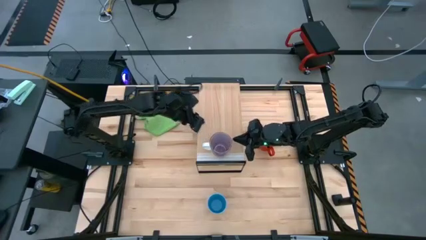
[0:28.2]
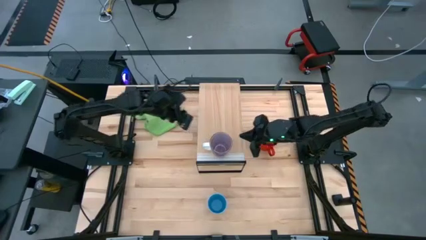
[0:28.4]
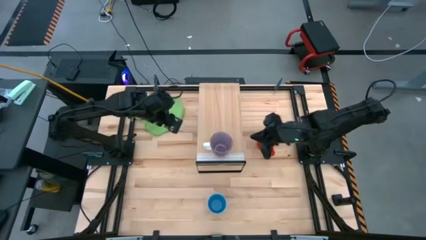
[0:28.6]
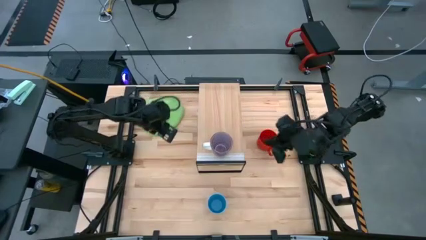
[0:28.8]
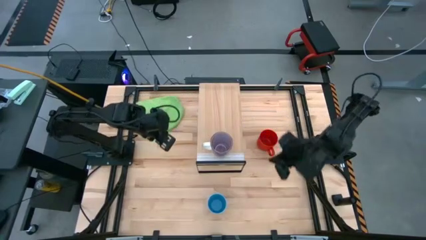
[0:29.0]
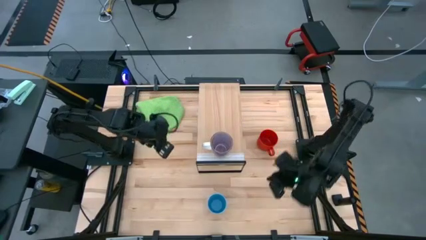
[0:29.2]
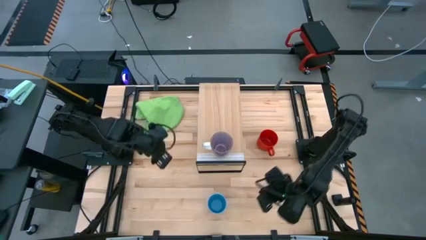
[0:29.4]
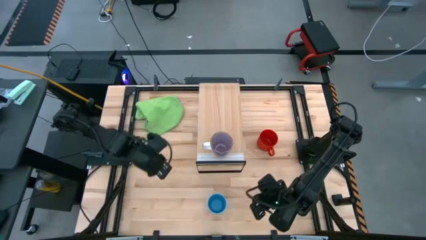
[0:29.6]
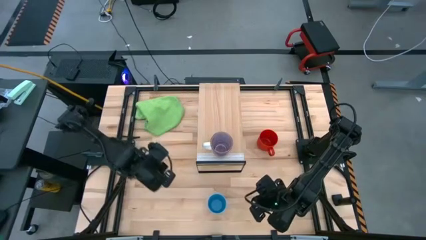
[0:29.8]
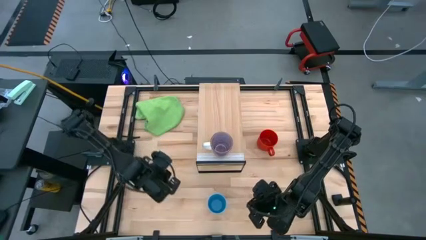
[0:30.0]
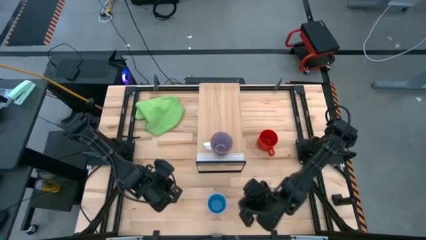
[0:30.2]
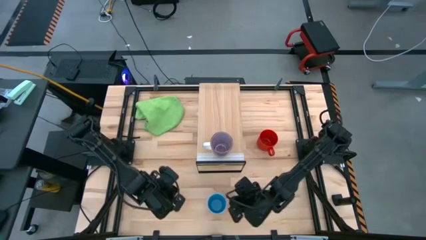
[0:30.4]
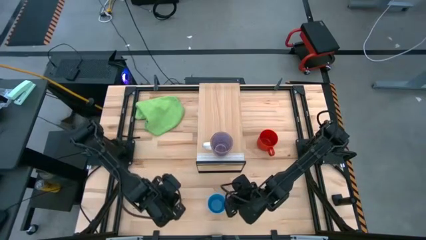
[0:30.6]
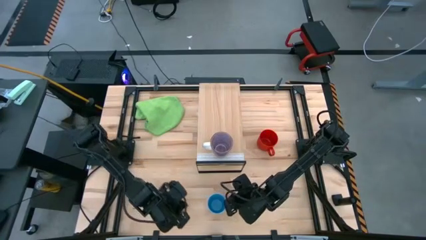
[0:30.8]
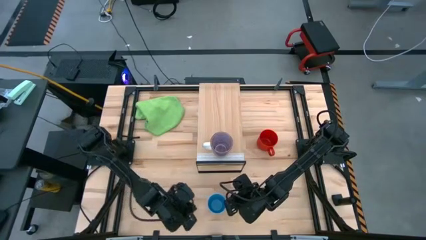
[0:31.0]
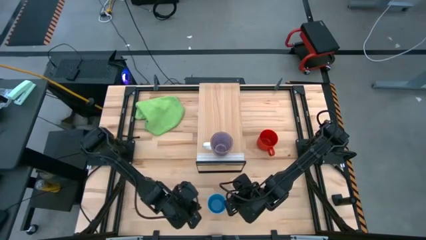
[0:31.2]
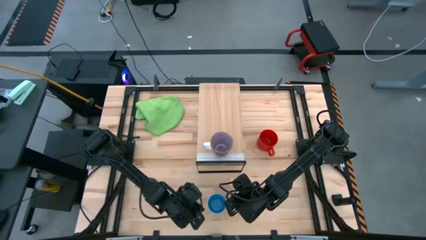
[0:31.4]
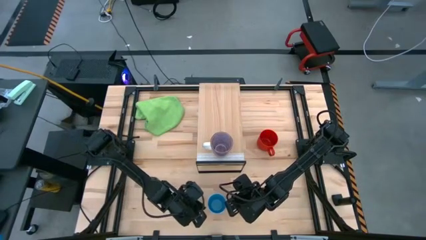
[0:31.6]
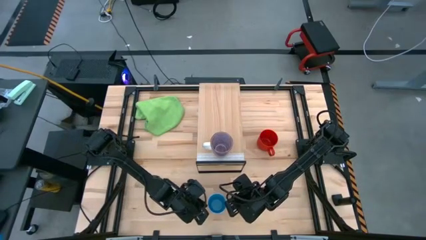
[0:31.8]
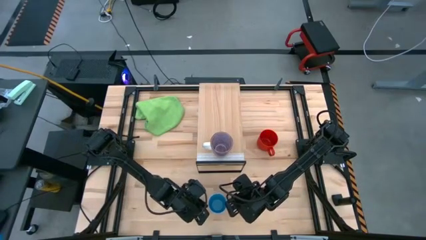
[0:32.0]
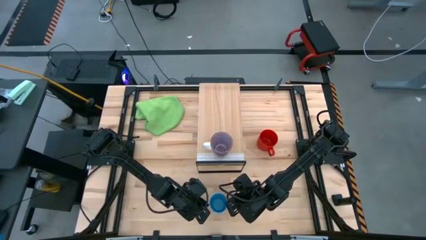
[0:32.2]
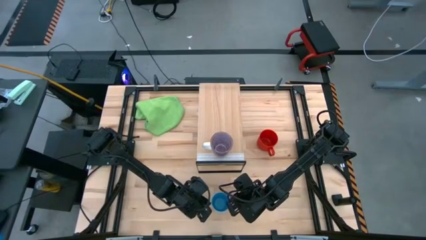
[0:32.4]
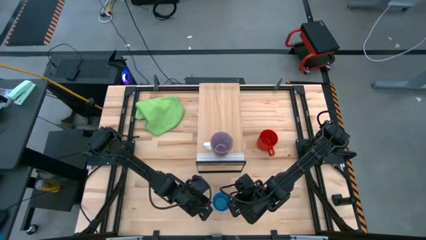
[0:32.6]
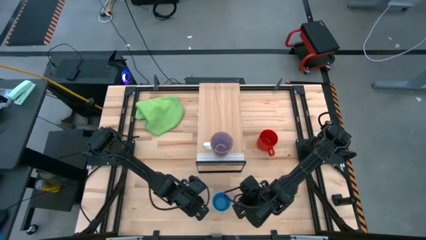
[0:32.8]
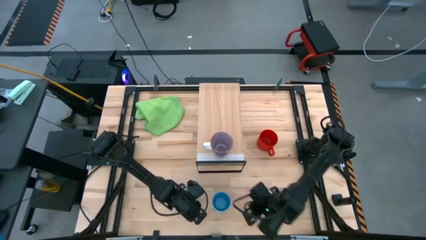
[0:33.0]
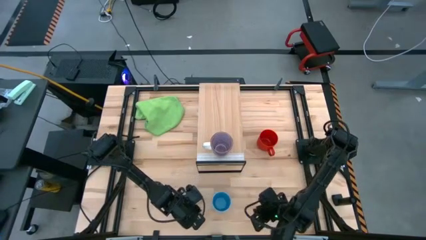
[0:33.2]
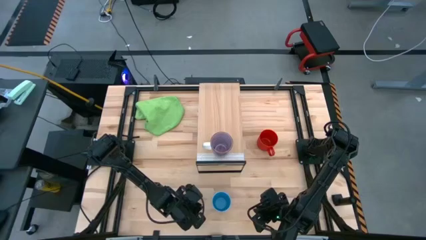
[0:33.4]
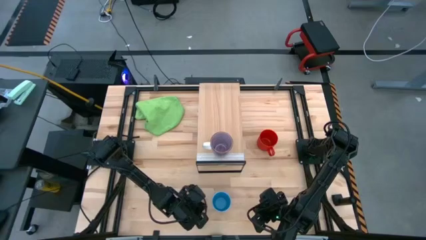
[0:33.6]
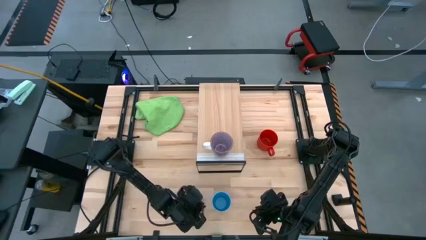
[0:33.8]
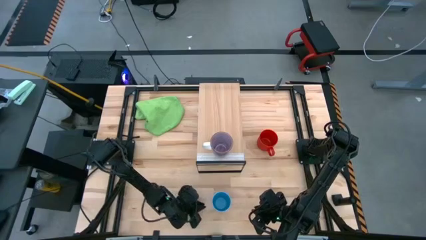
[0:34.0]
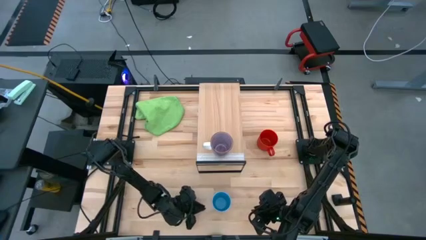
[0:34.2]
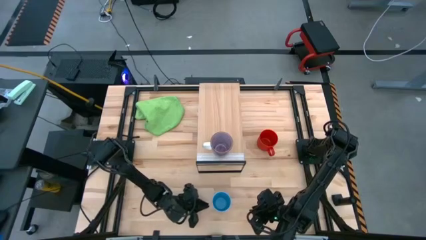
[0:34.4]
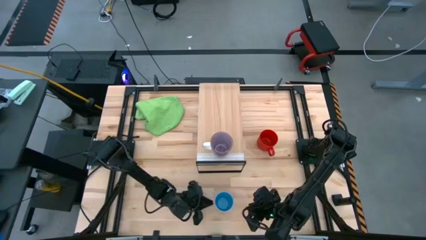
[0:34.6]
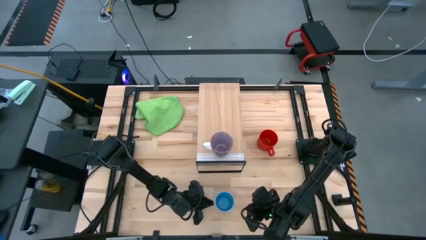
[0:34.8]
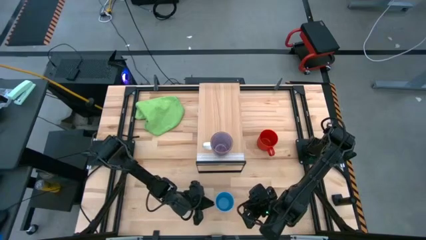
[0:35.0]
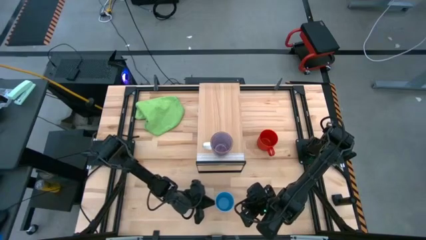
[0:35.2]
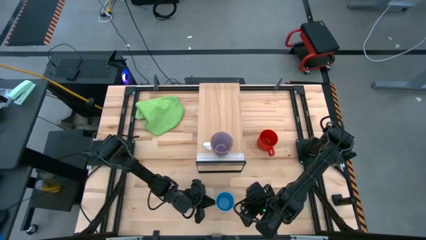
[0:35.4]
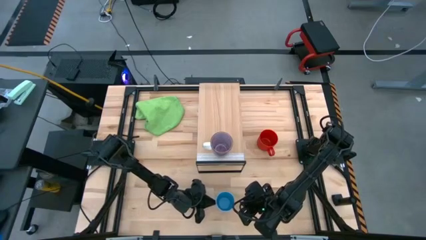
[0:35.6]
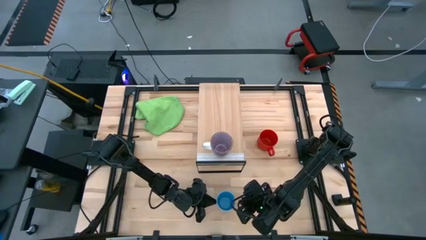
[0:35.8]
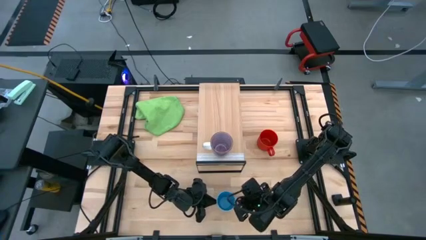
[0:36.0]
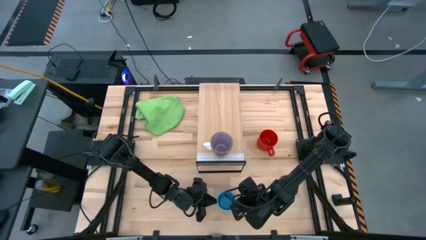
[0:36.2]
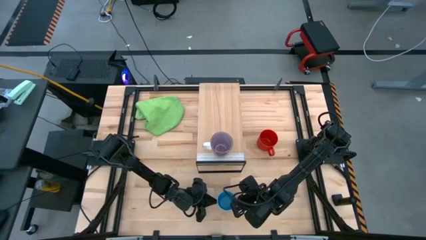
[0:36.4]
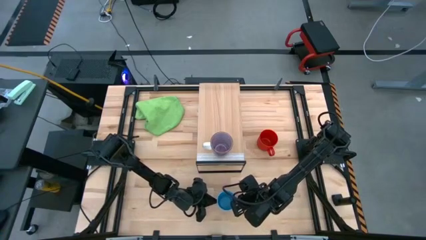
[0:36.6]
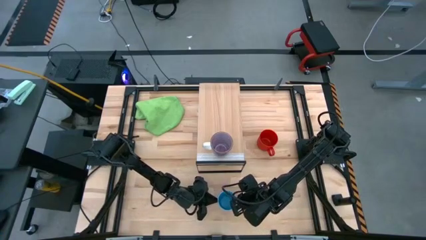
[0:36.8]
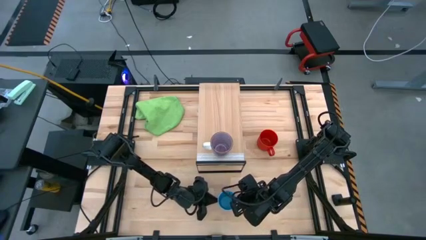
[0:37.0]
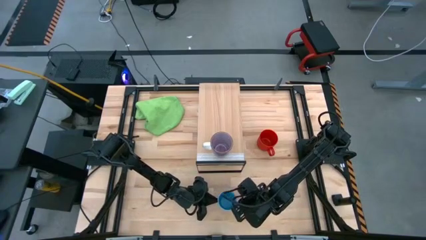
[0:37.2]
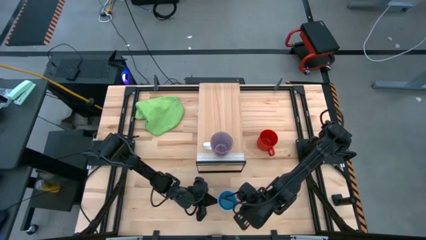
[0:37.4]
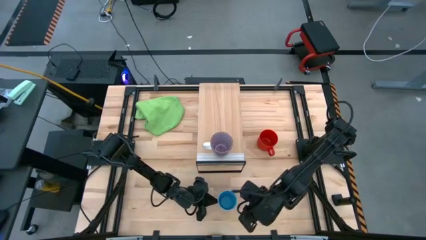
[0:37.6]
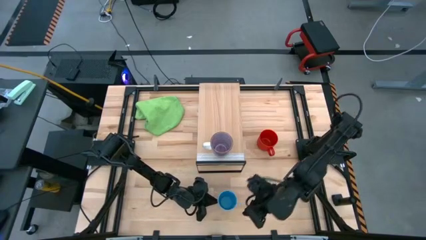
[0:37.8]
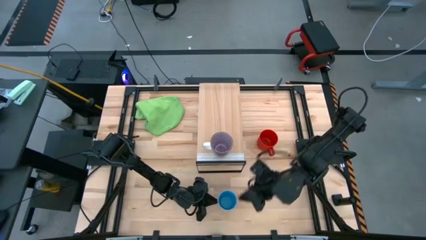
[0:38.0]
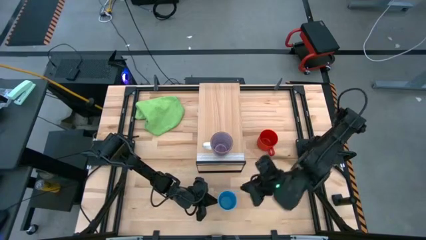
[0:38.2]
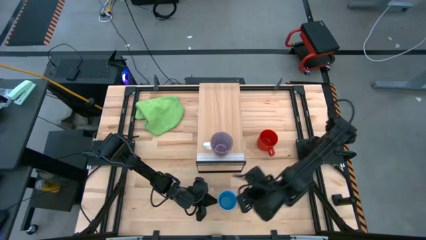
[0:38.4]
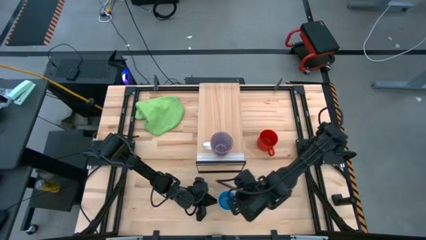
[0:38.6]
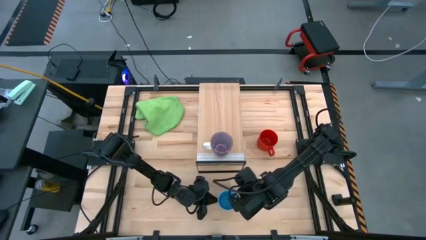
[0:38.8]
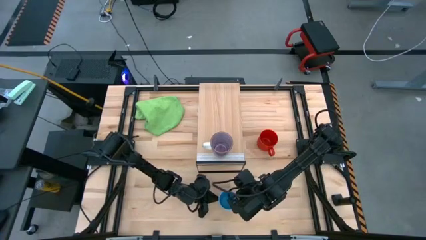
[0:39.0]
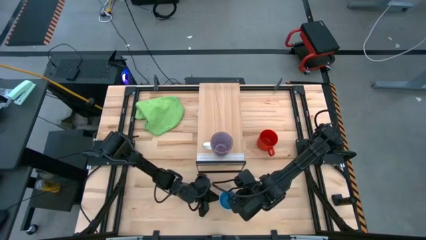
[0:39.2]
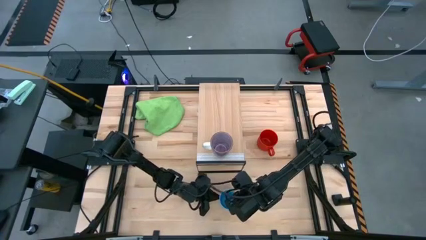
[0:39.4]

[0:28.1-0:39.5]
Task: Stack small to large cups/mugs on shelf
Put the blue cup on the shelf
